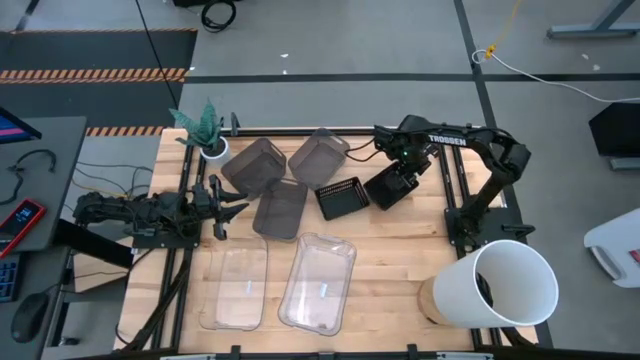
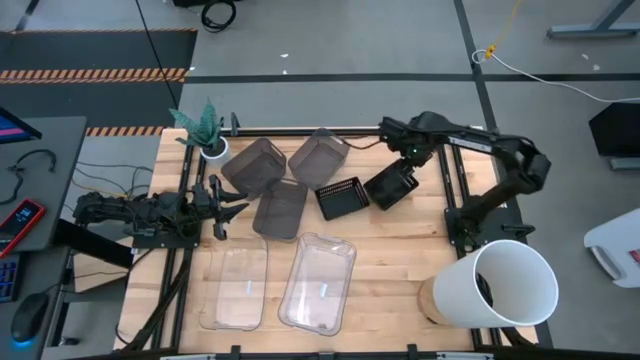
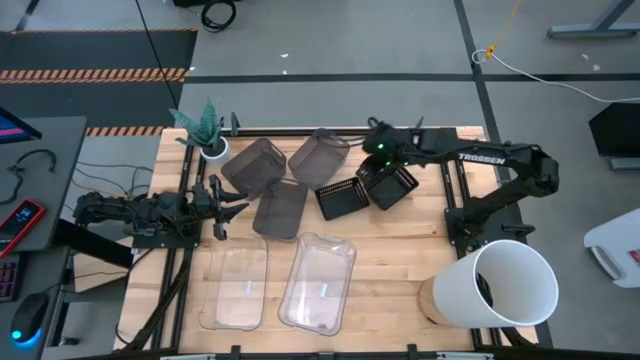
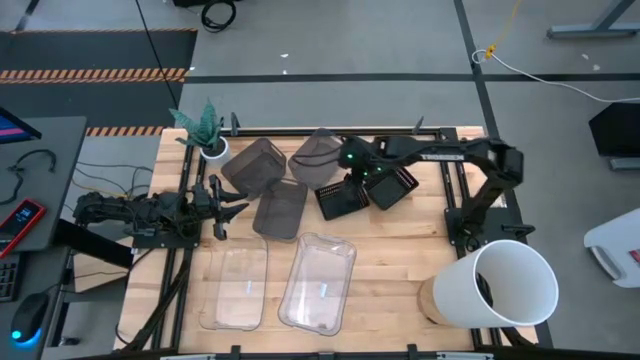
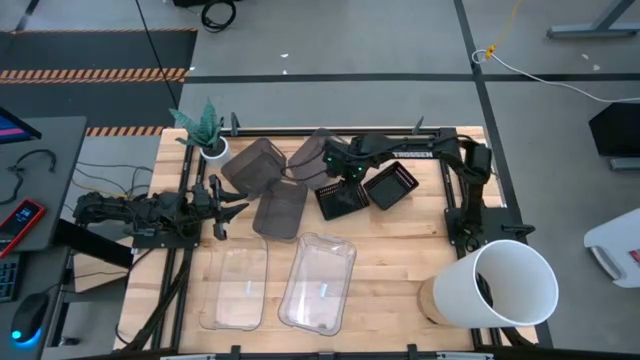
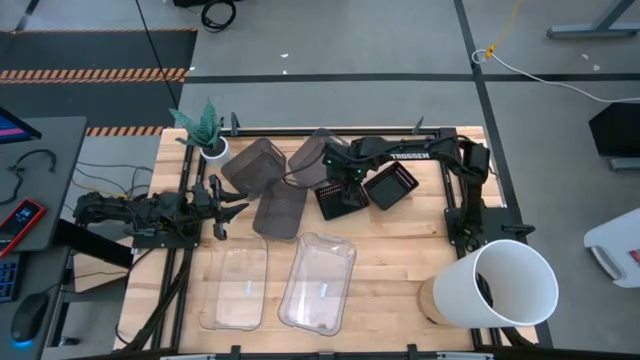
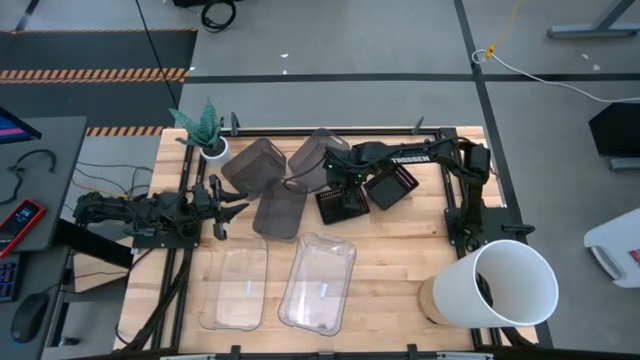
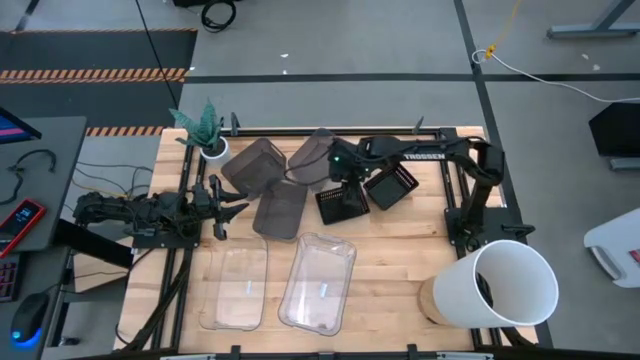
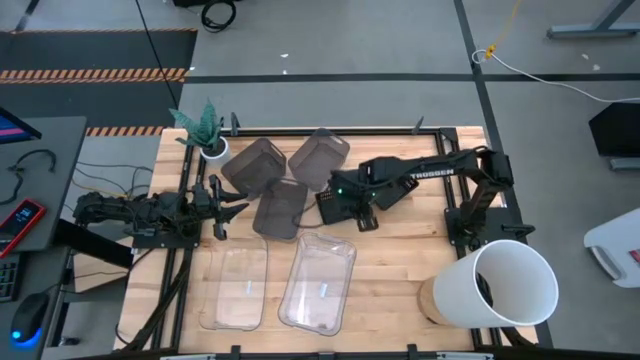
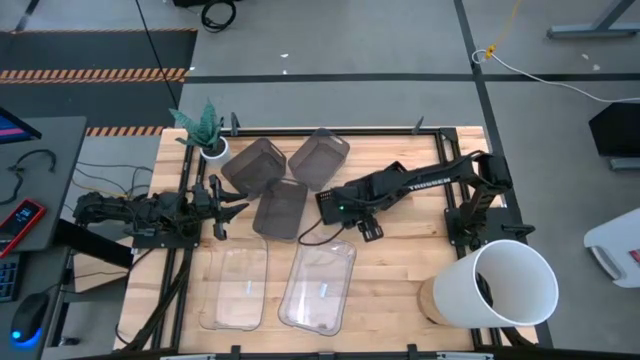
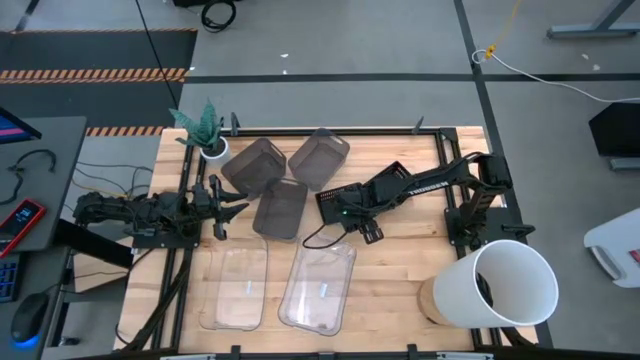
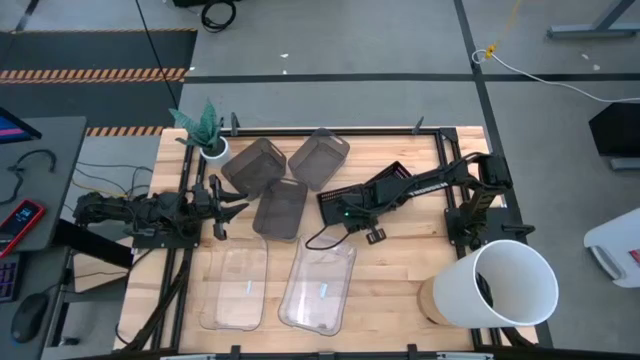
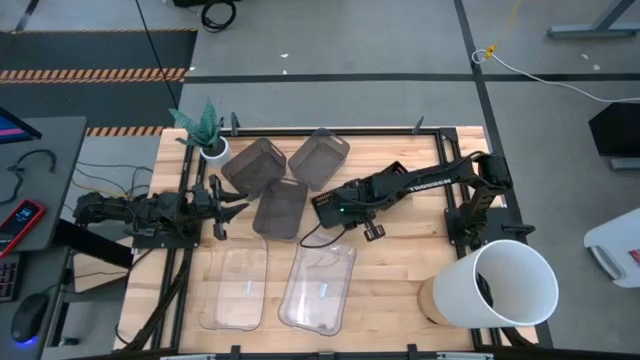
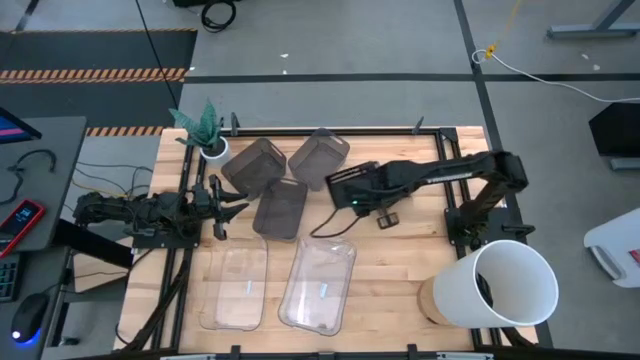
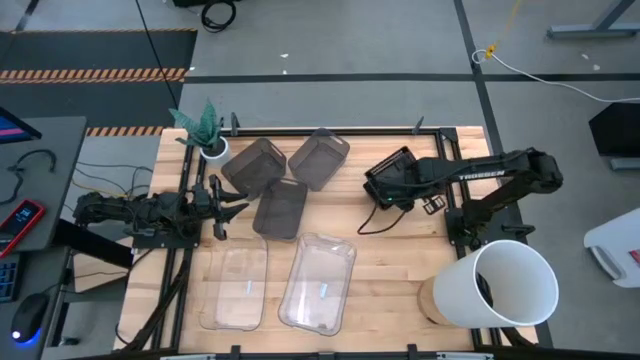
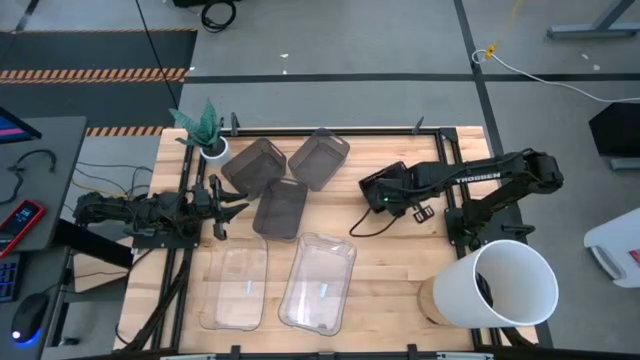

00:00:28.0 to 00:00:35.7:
Stack the black bin on top of the black bins

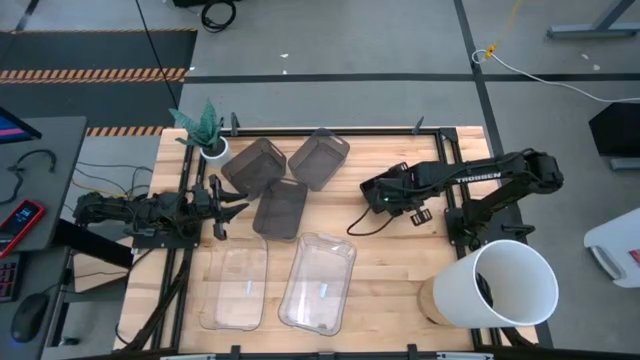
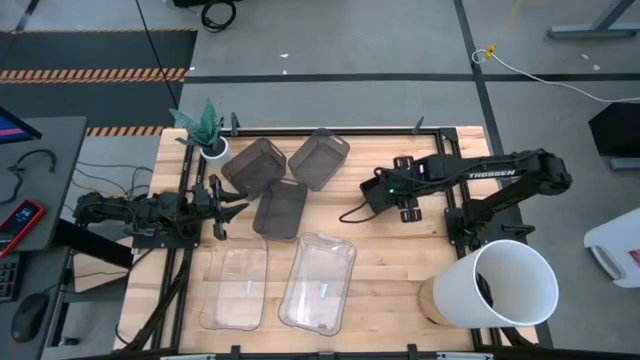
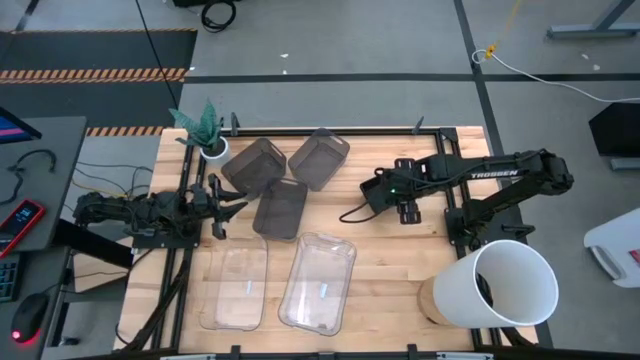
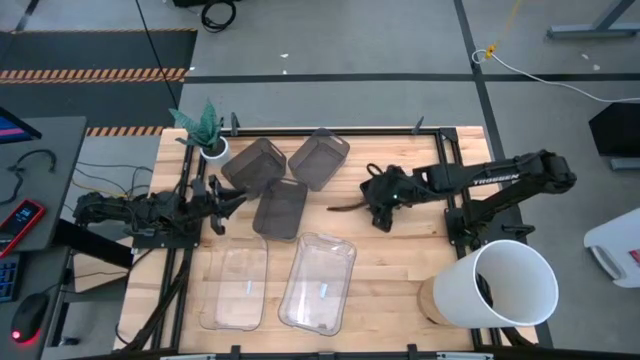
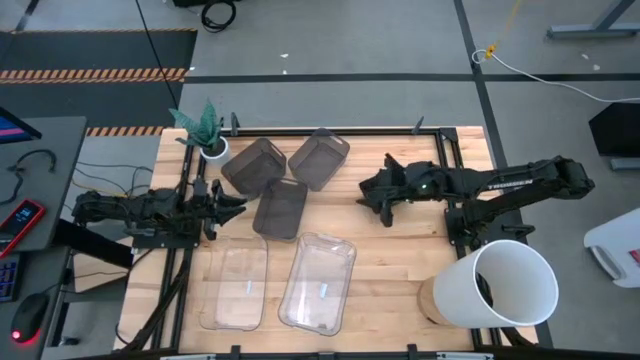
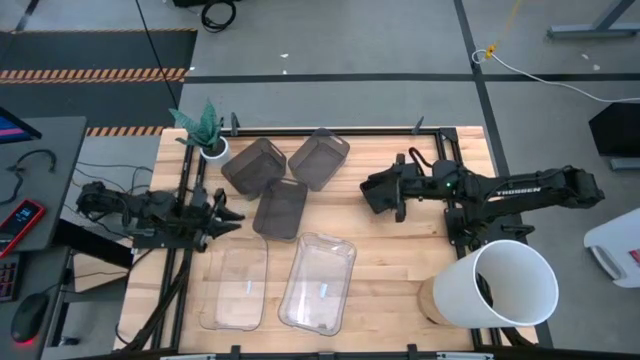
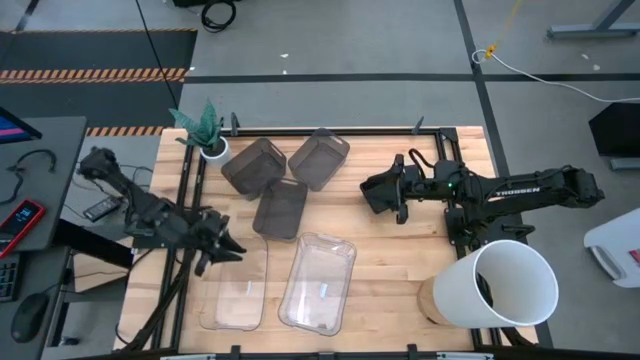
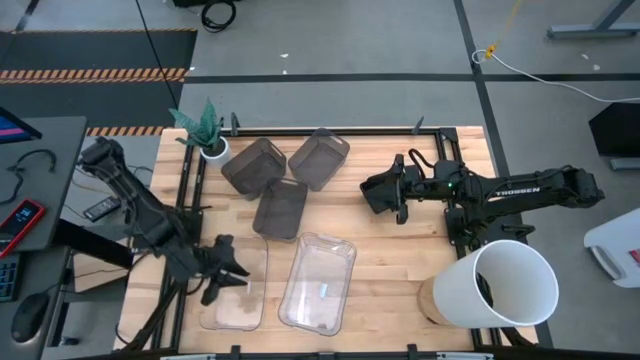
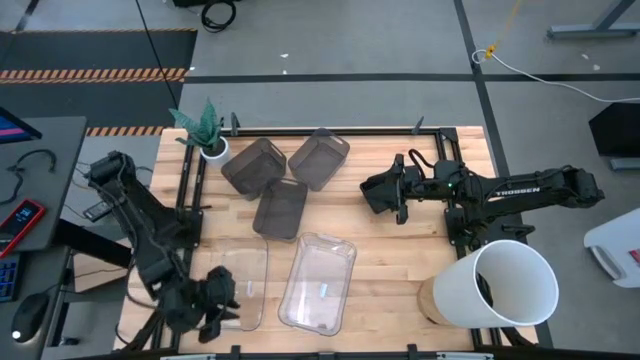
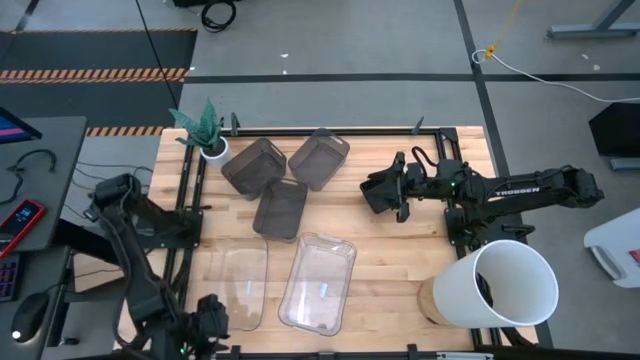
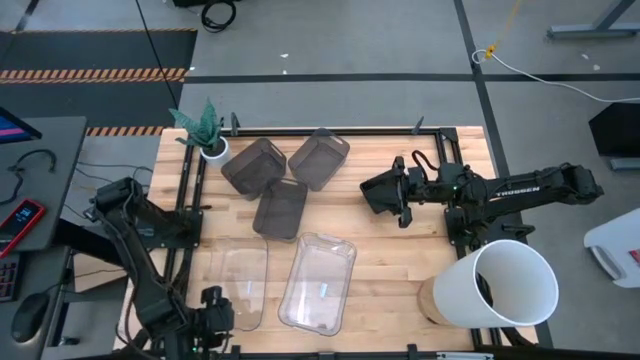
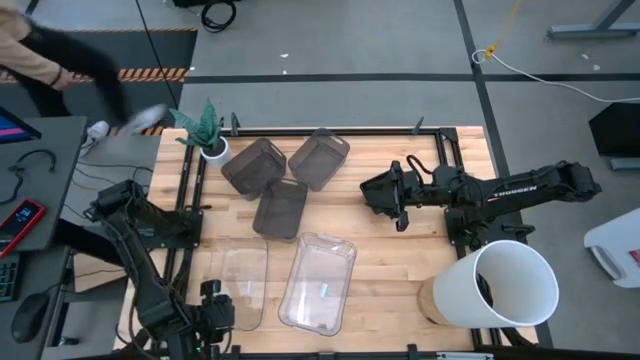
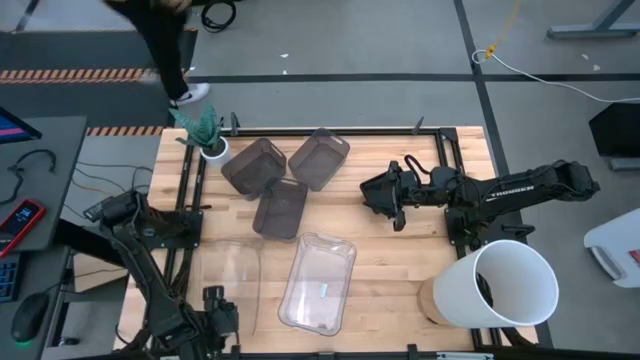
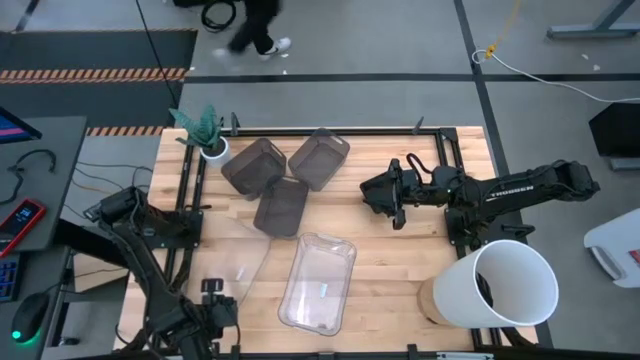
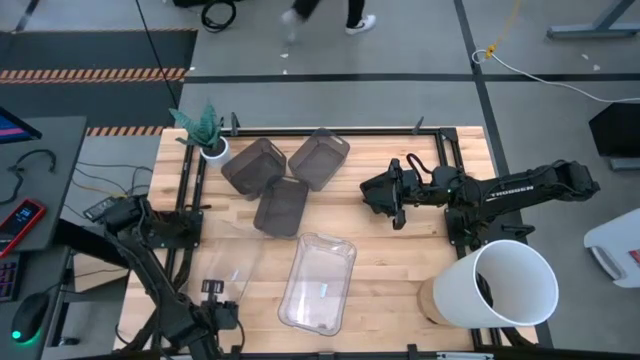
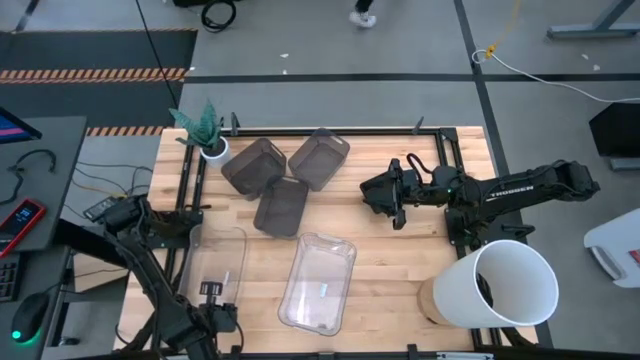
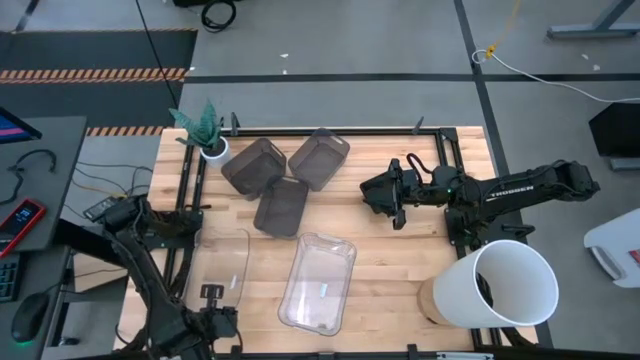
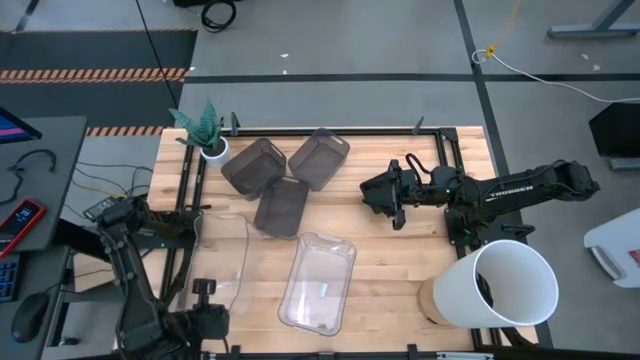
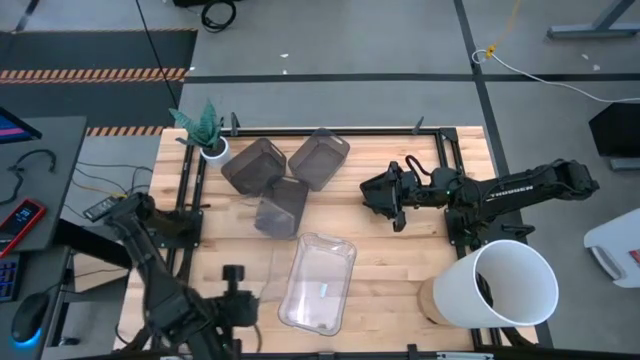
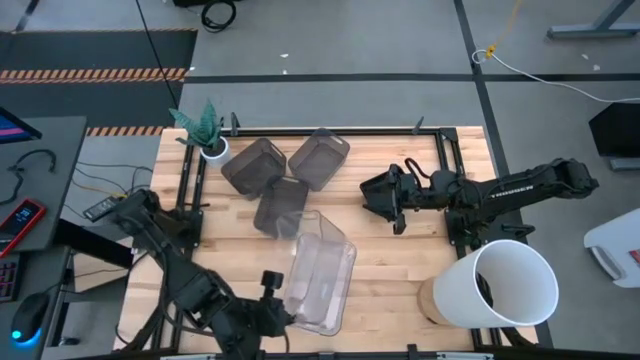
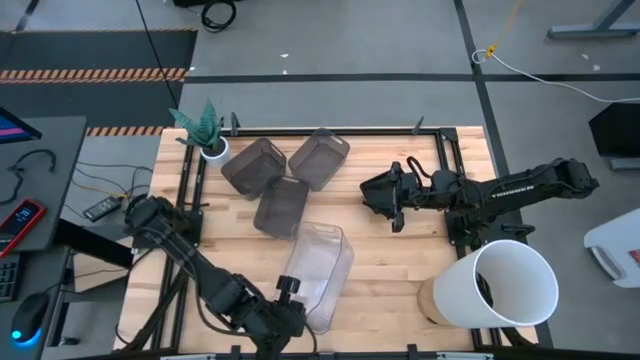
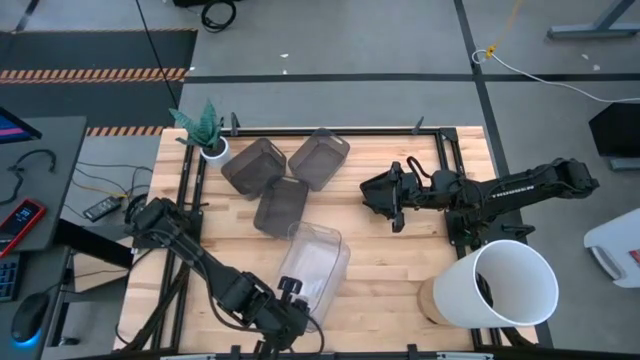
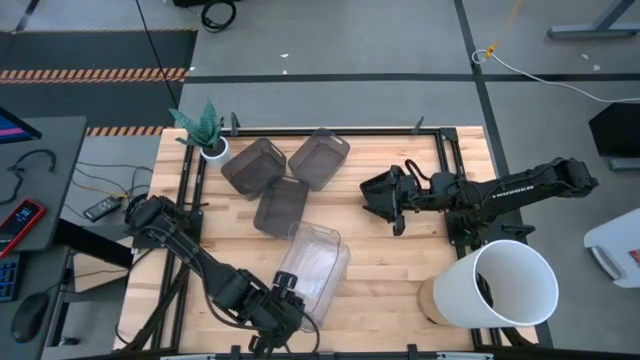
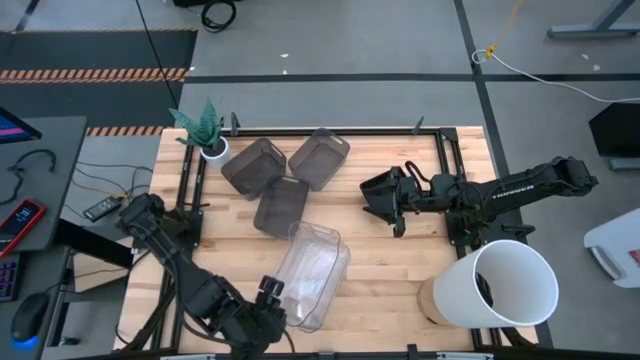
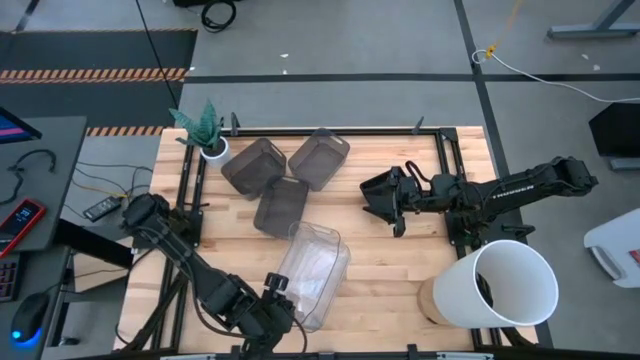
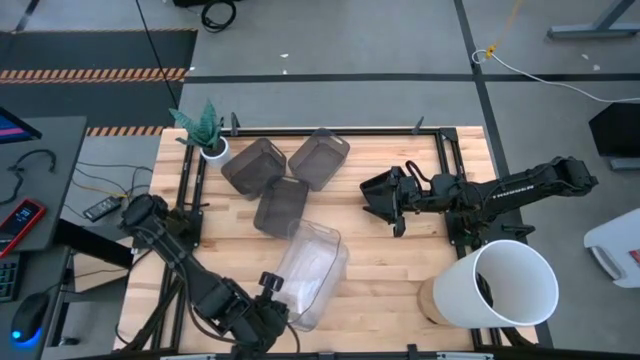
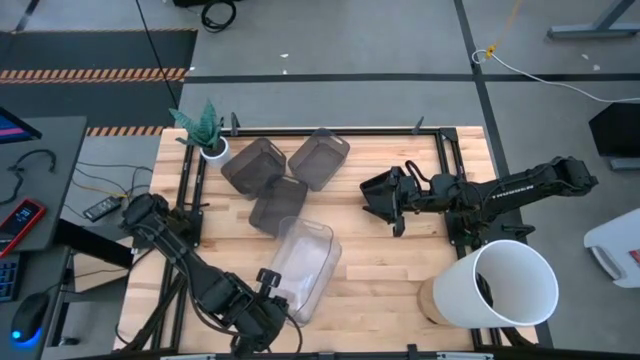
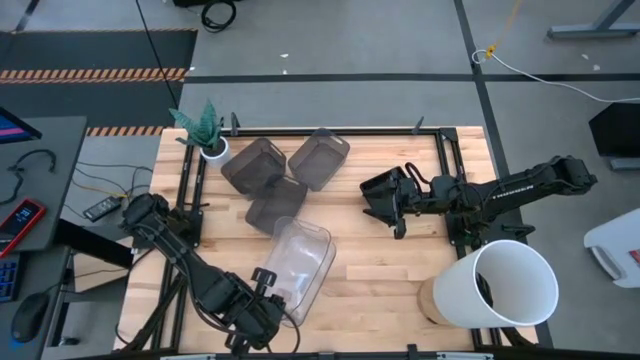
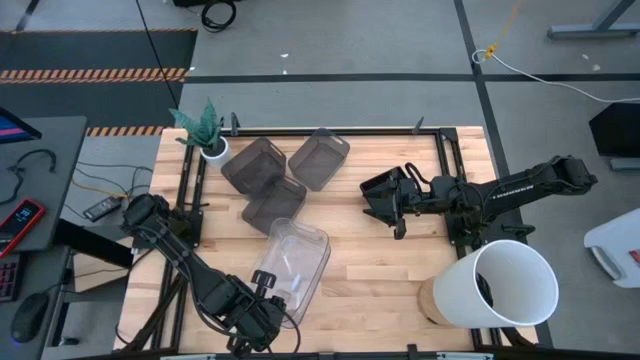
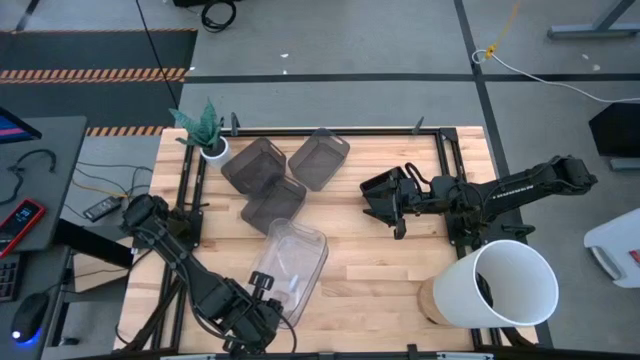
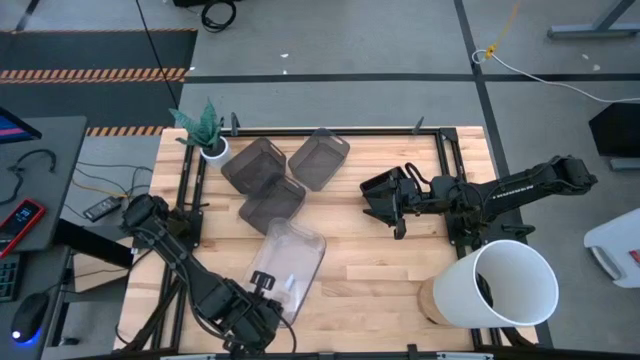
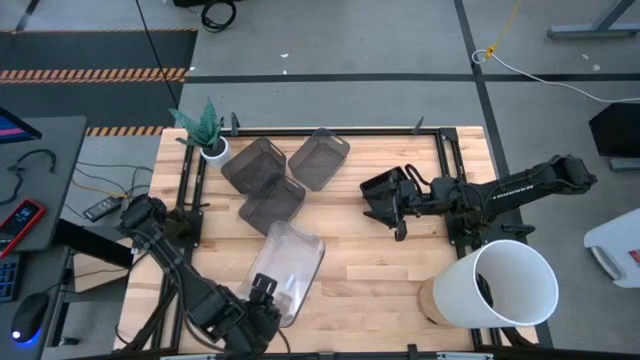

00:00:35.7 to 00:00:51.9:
Stack the transparent bin on top of the transparent bins
